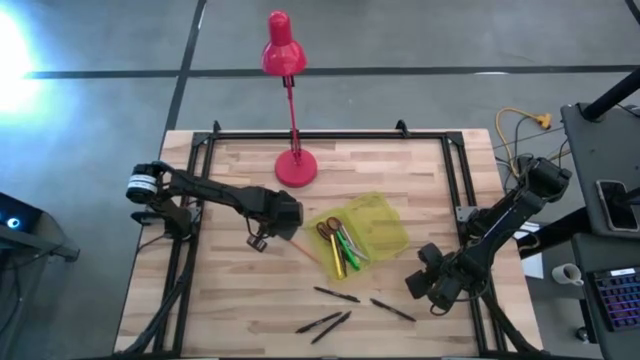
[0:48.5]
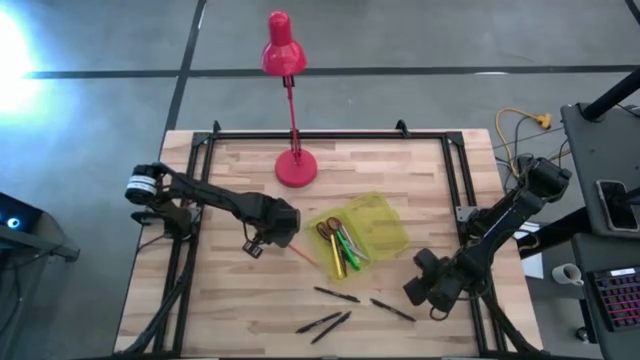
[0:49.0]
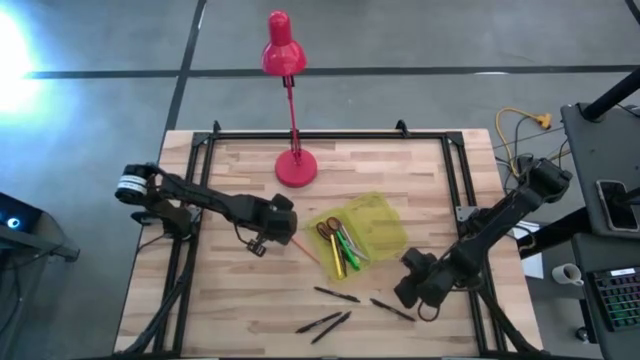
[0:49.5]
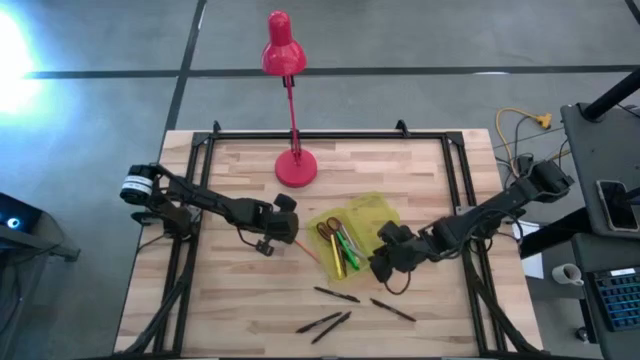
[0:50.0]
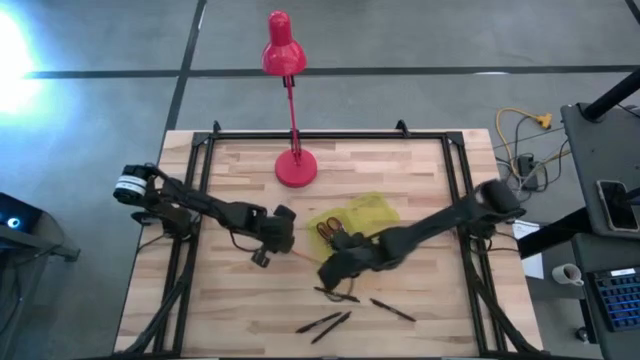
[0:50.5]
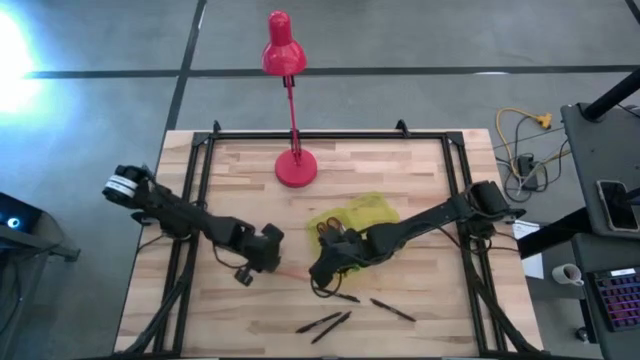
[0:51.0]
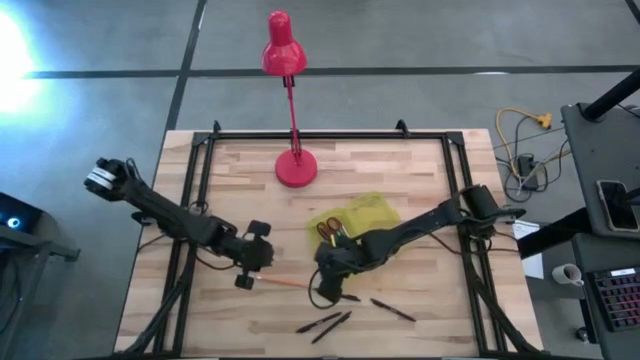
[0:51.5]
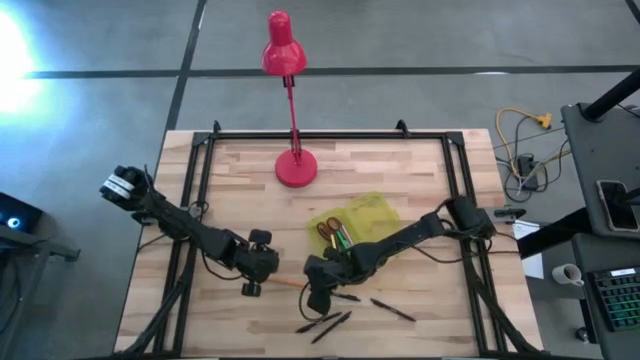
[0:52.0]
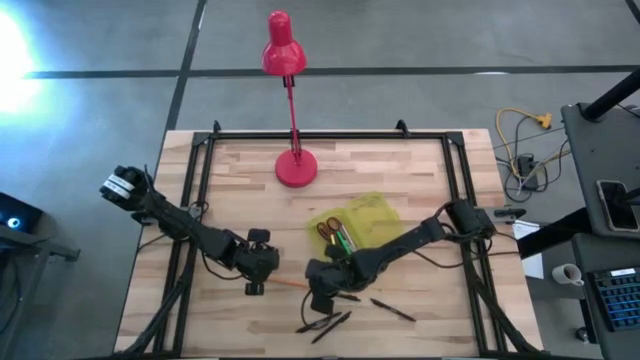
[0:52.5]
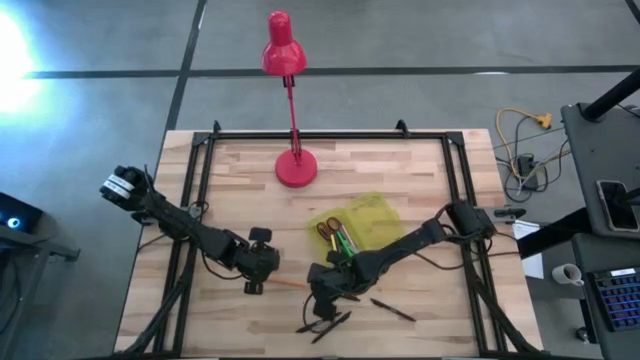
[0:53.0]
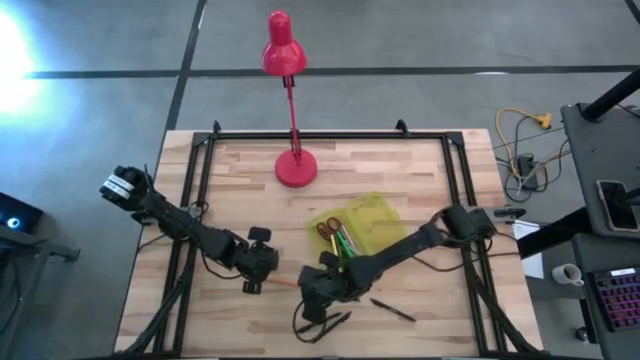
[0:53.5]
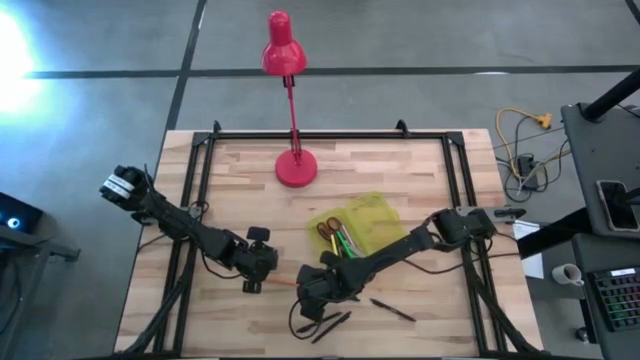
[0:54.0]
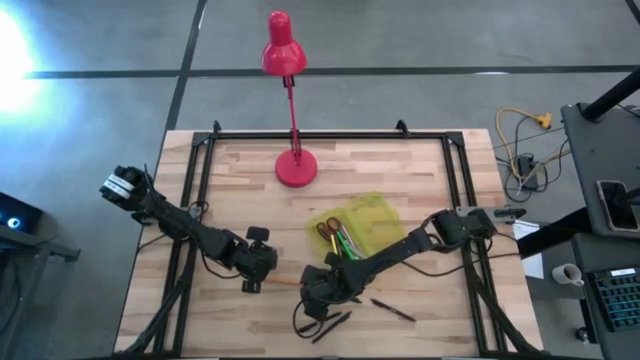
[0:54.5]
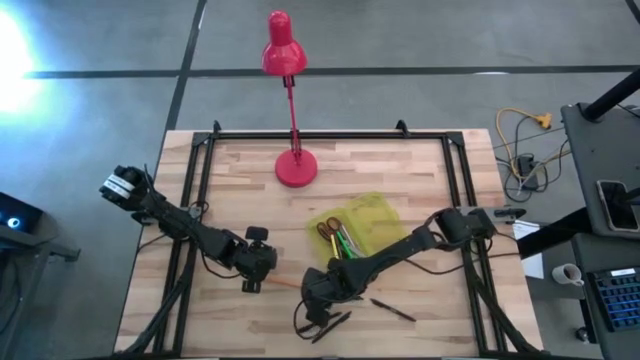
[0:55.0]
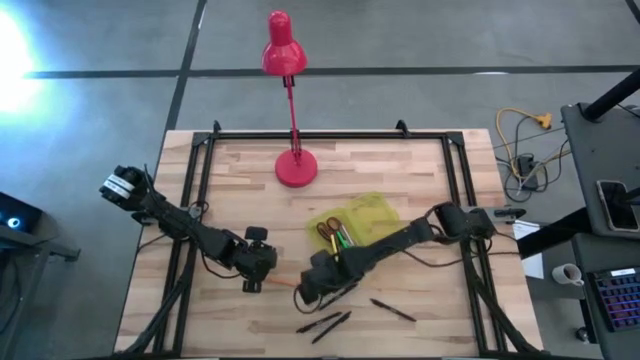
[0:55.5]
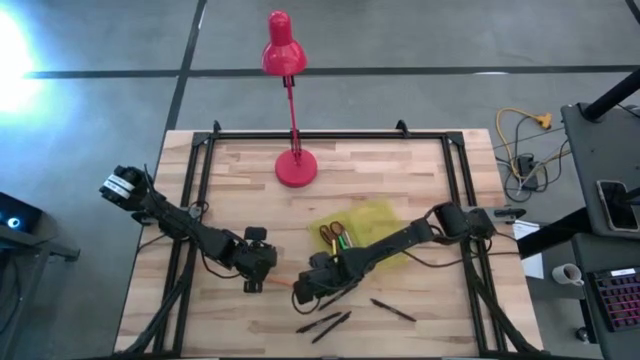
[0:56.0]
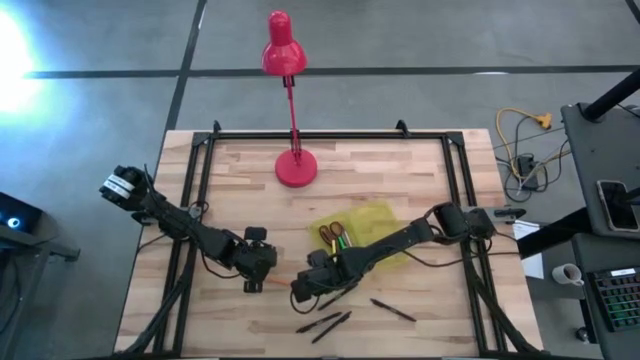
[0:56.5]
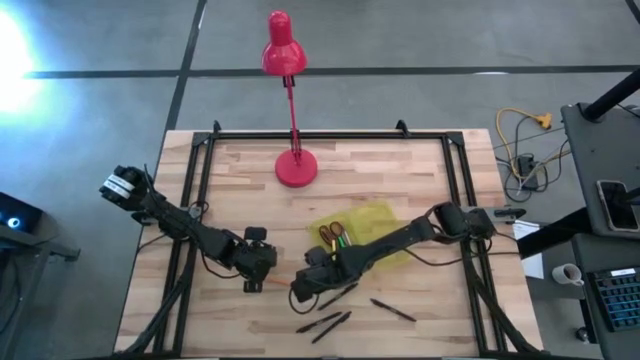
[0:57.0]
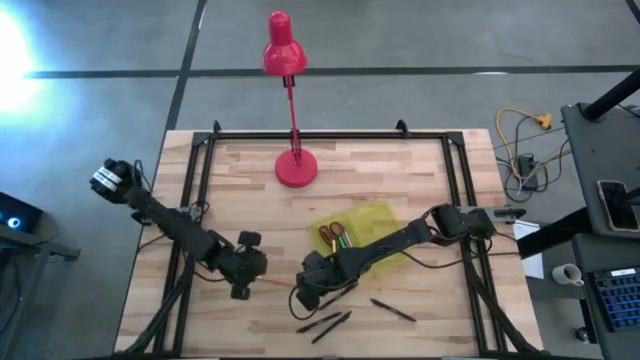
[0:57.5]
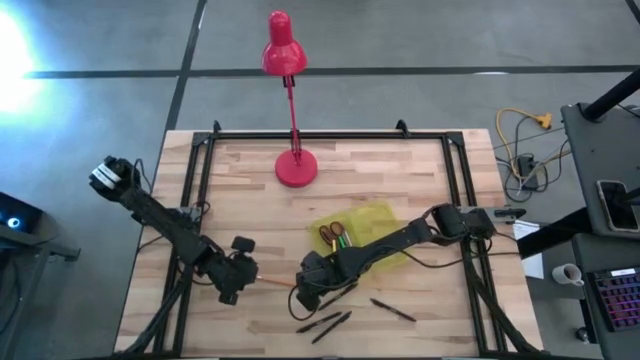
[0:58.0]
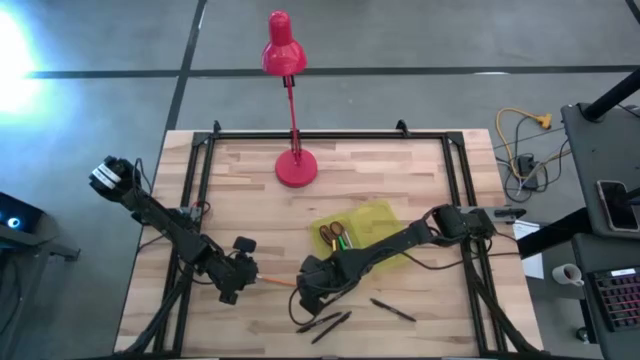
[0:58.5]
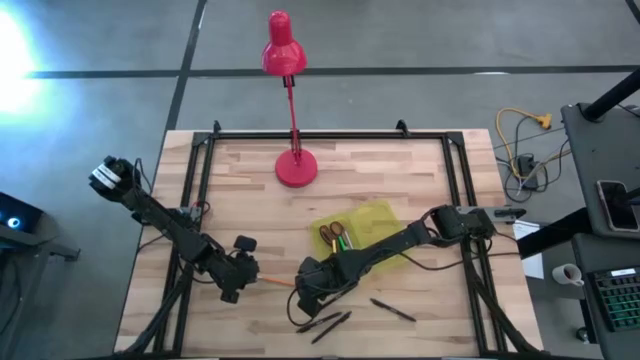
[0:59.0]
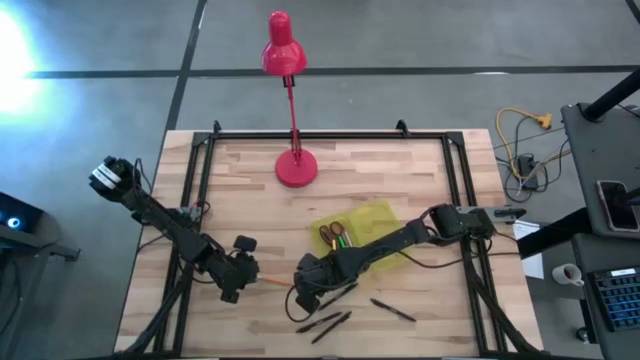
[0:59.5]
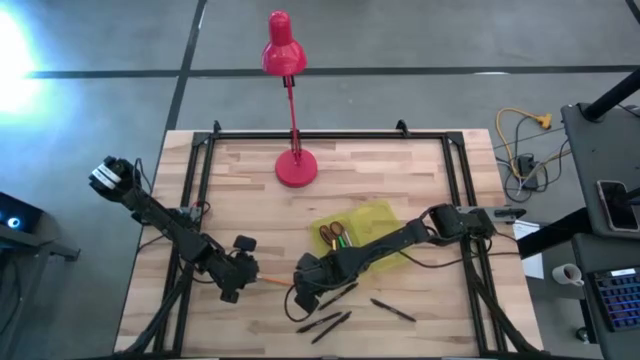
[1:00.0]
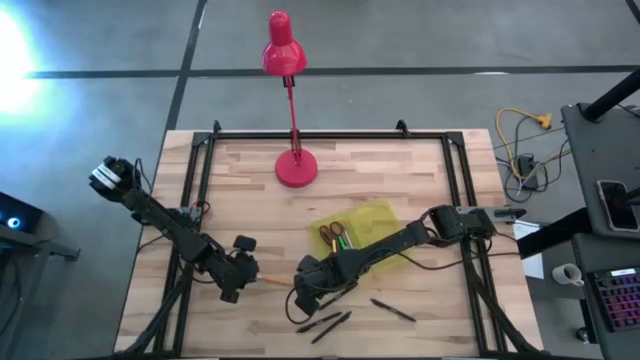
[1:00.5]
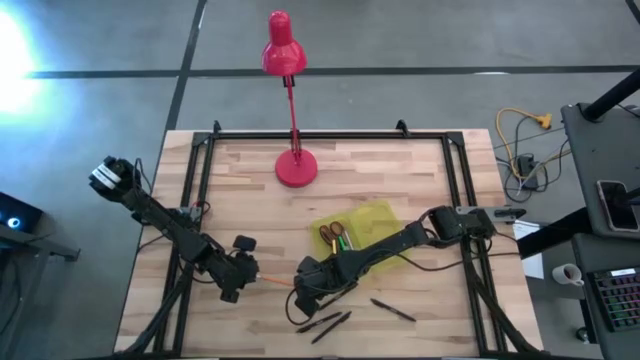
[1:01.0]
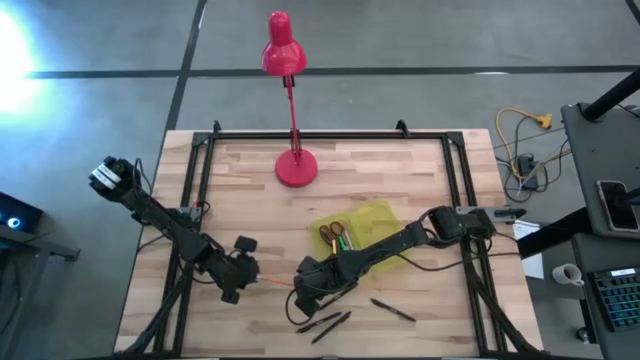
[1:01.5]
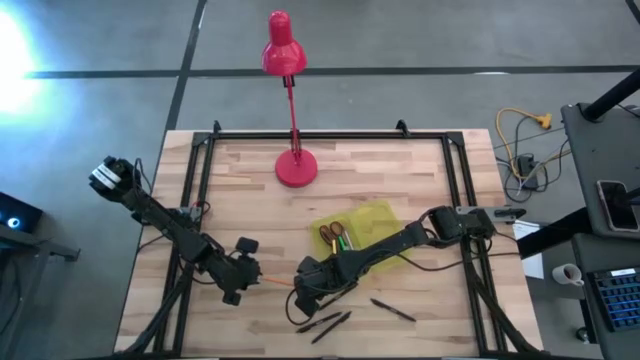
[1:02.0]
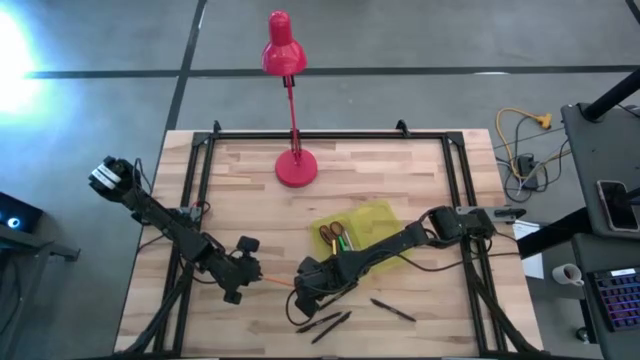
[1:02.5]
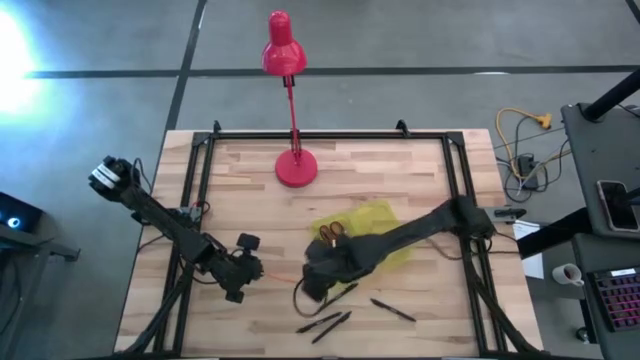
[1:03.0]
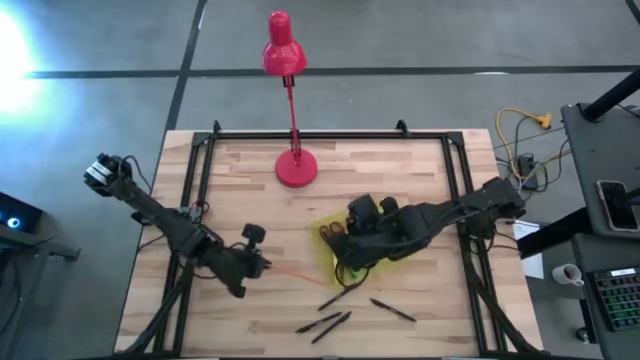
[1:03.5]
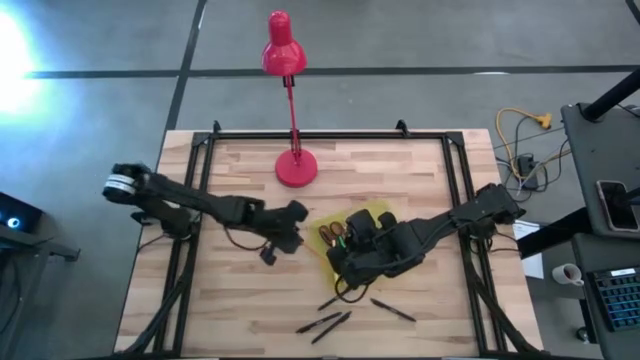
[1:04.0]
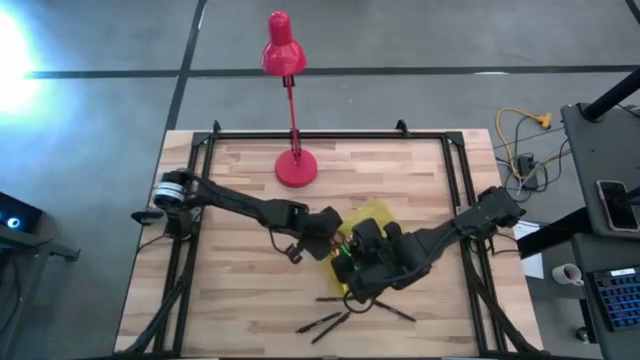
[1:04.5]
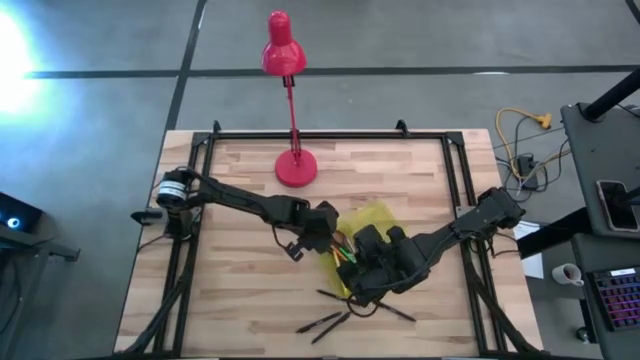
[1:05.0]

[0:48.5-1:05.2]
Task: Pick & place school supplies into a supply box
Put the orange pencil into the yellow supply box

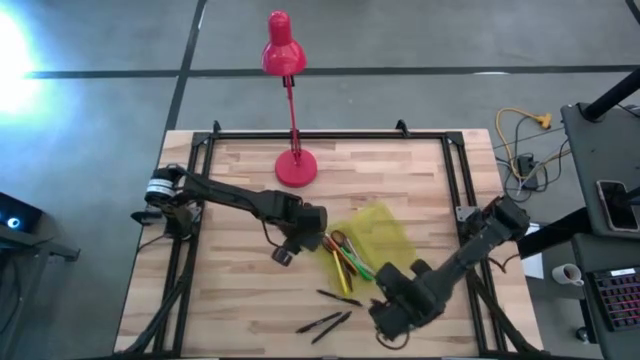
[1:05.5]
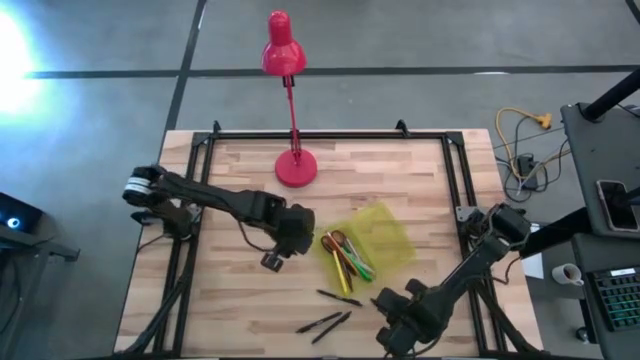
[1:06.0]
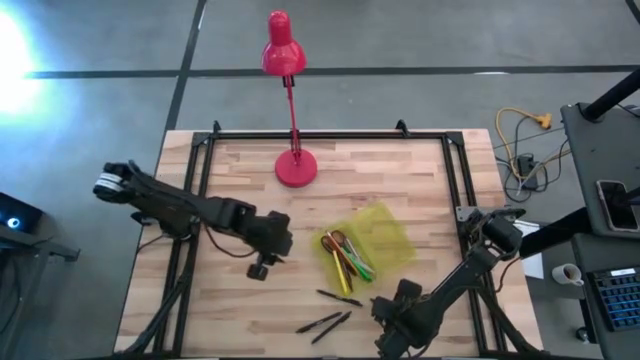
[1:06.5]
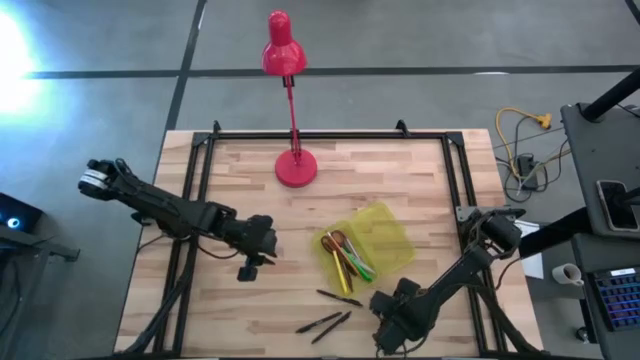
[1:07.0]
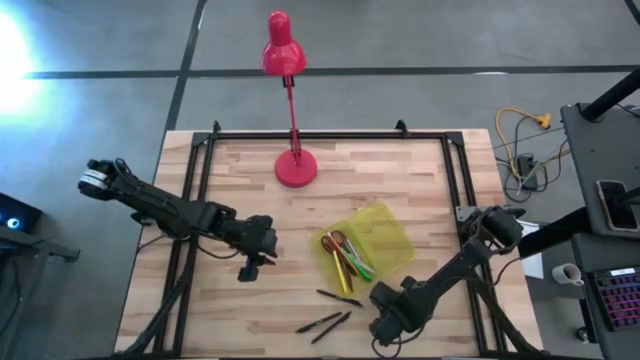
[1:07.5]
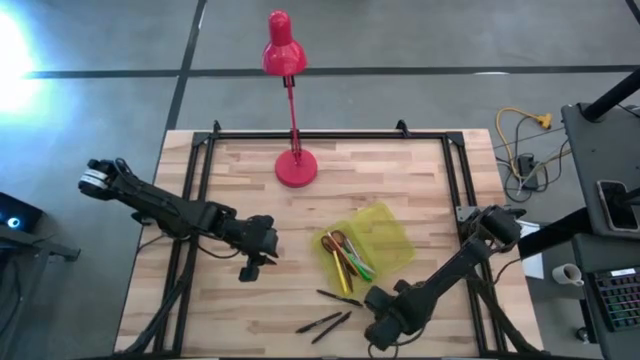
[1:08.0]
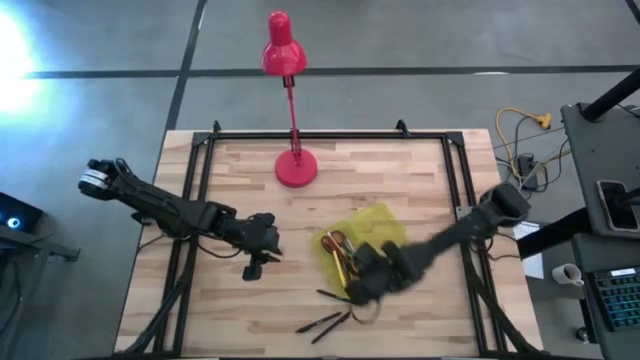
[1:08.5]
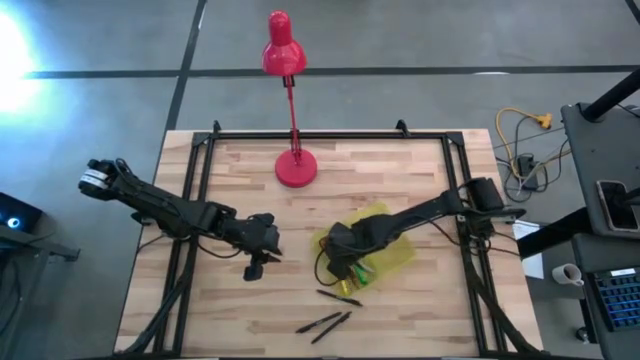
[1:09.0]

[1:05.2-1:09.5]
Put the black pen into the yellow supply box

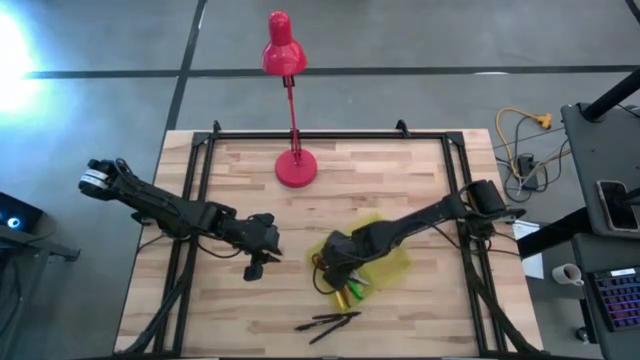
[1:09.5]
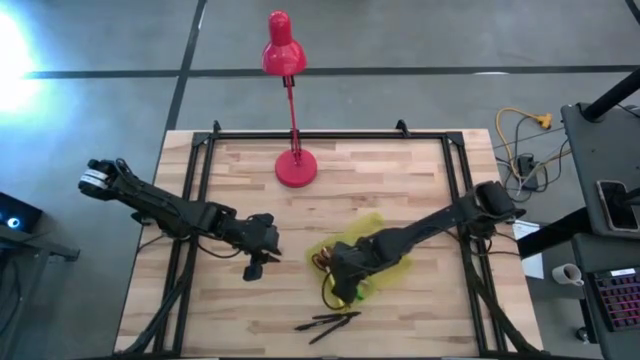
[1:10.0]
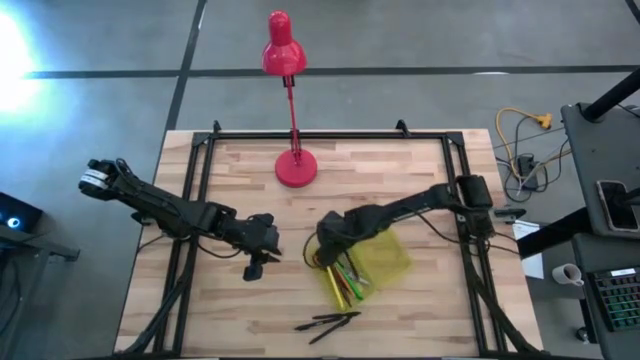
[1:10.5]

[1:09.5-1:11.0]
Adjust the yellow supply box
